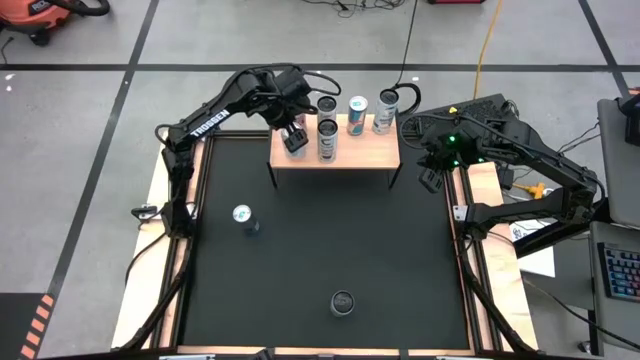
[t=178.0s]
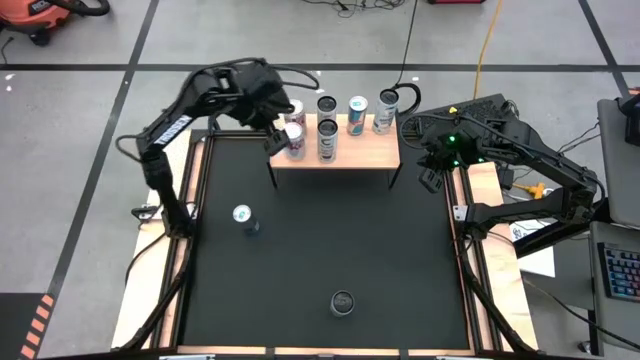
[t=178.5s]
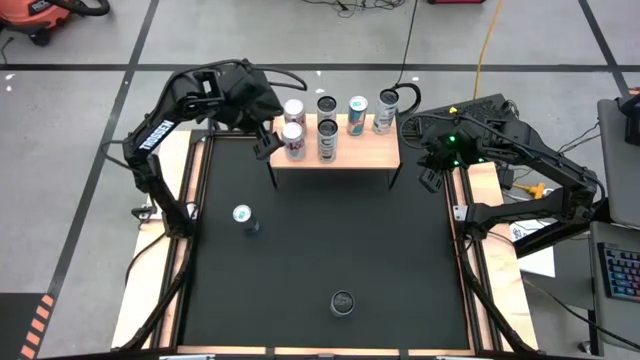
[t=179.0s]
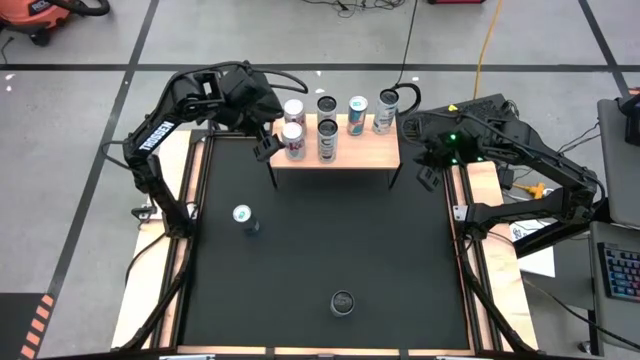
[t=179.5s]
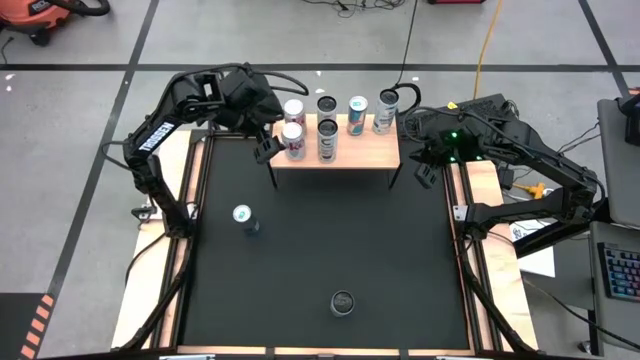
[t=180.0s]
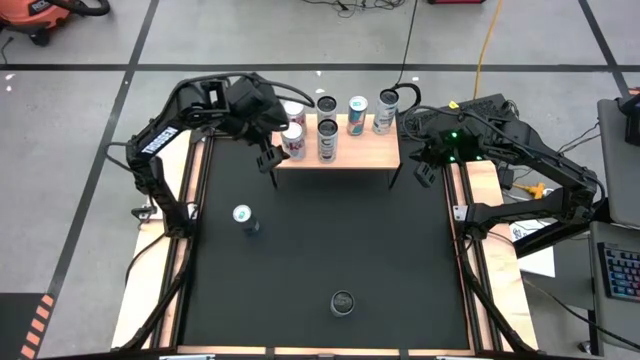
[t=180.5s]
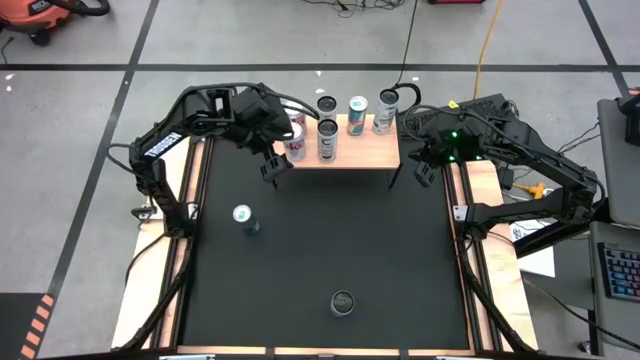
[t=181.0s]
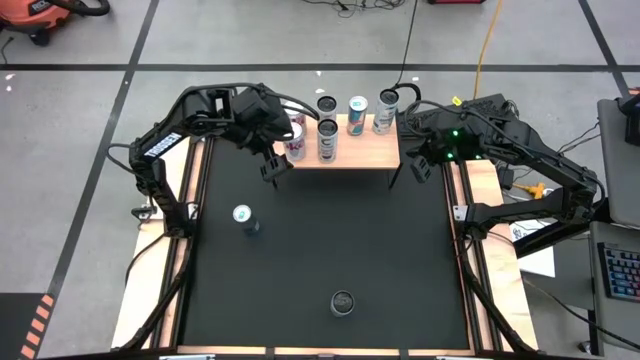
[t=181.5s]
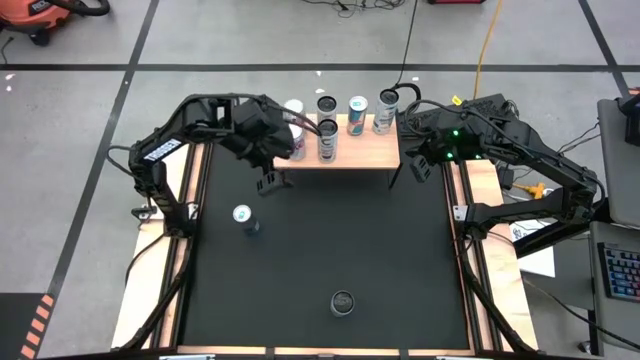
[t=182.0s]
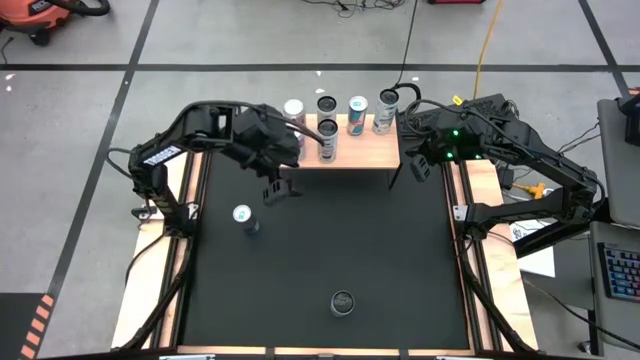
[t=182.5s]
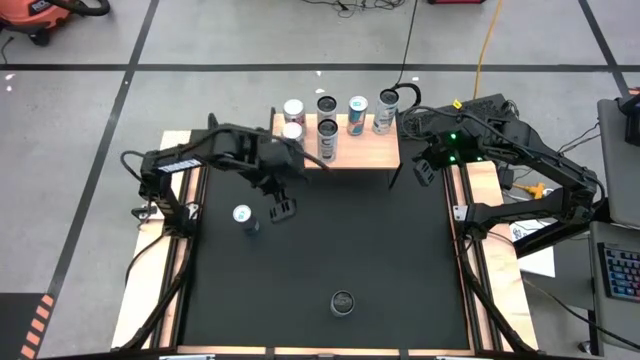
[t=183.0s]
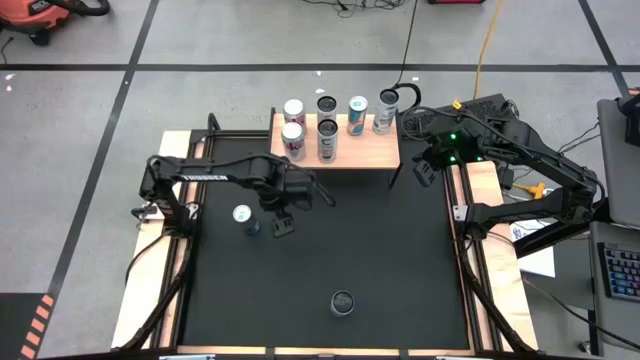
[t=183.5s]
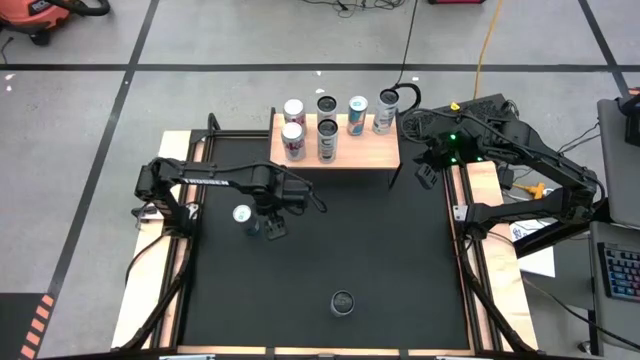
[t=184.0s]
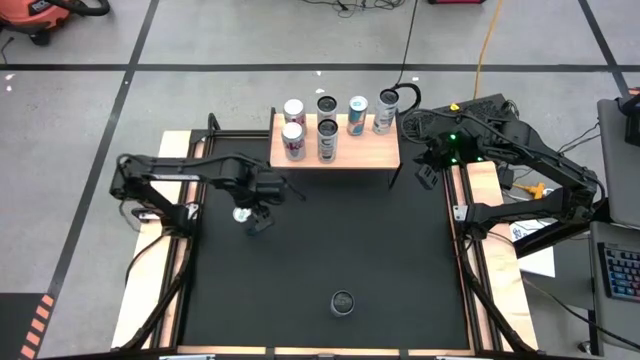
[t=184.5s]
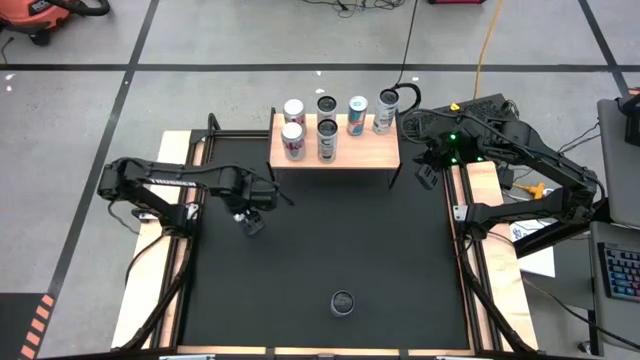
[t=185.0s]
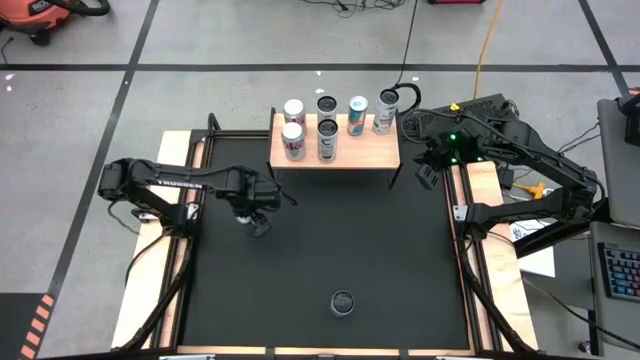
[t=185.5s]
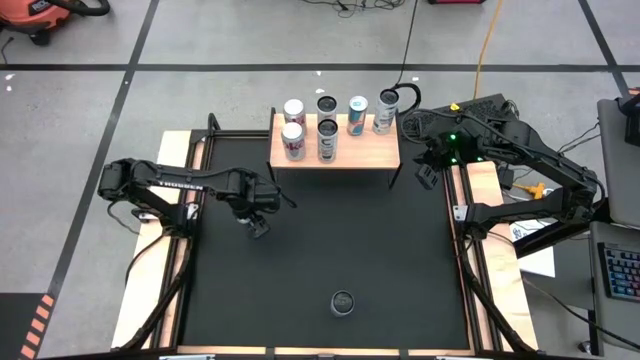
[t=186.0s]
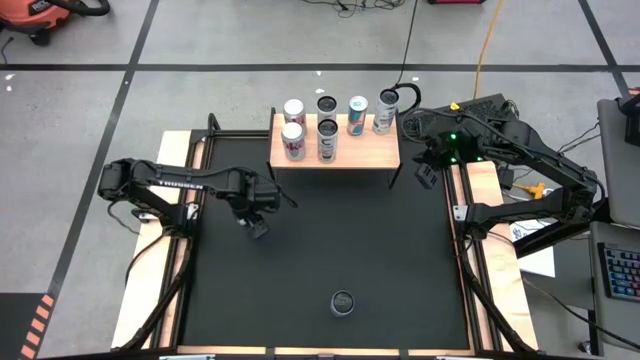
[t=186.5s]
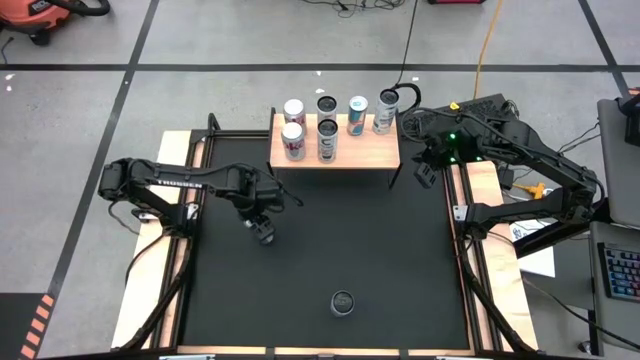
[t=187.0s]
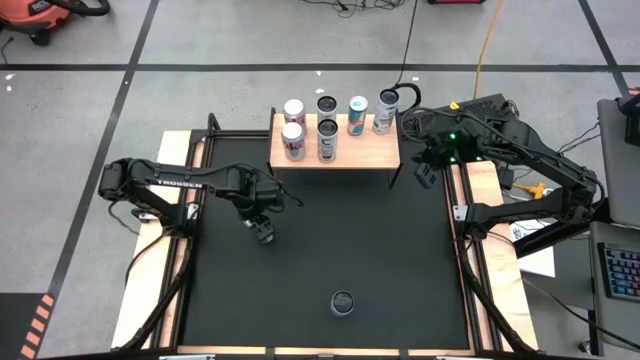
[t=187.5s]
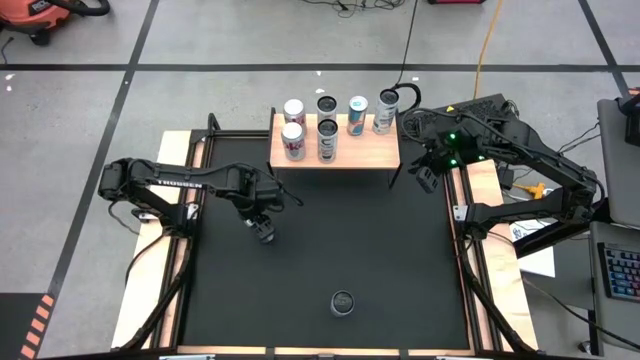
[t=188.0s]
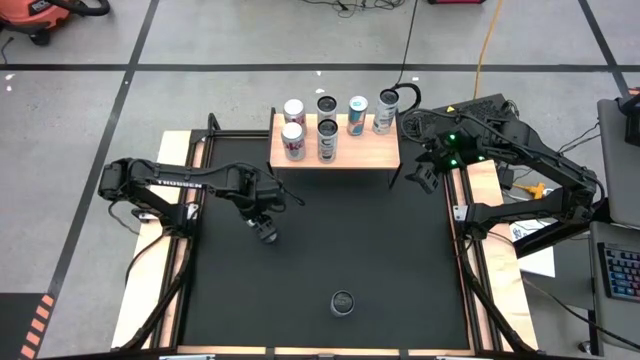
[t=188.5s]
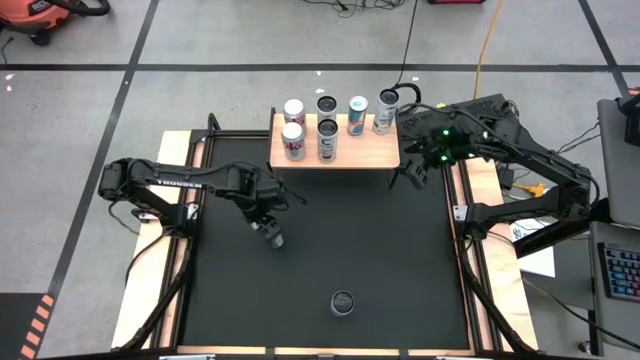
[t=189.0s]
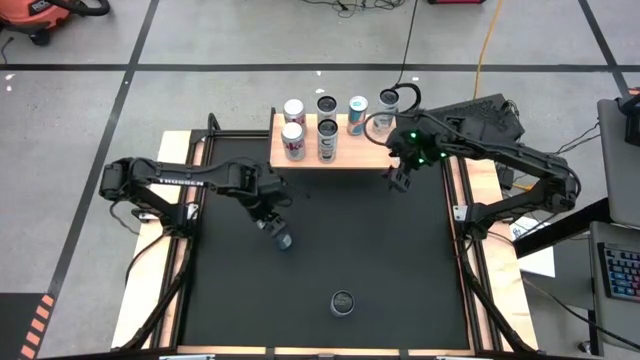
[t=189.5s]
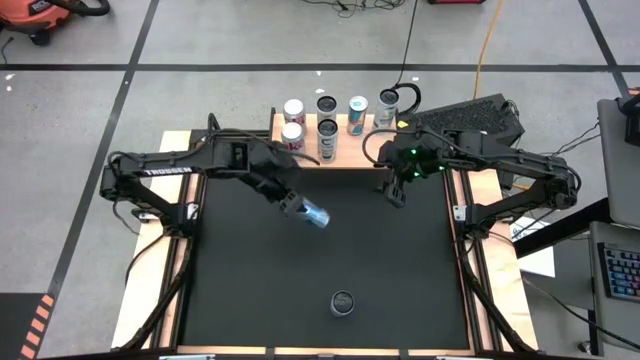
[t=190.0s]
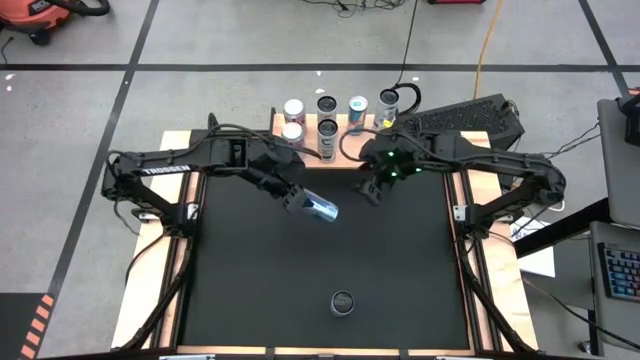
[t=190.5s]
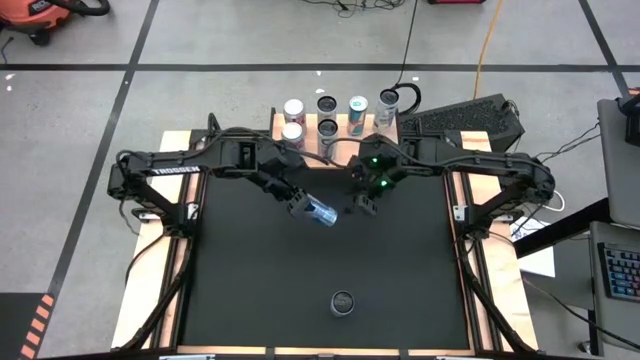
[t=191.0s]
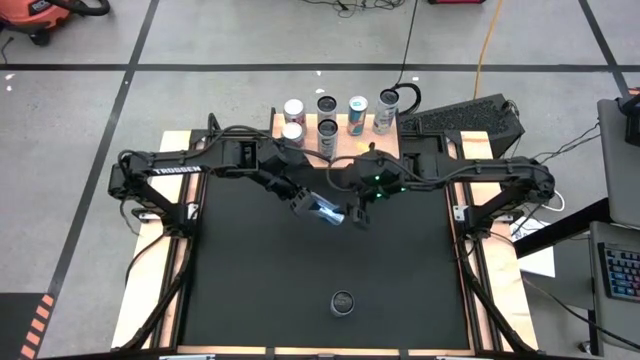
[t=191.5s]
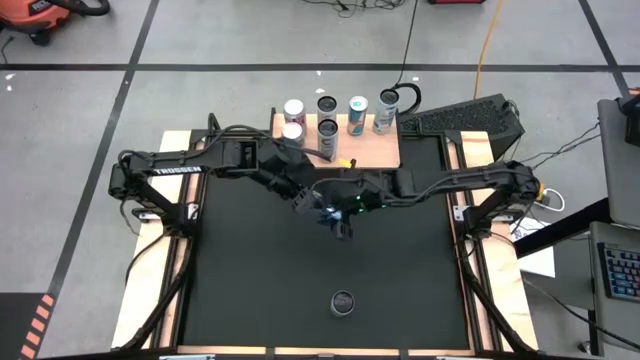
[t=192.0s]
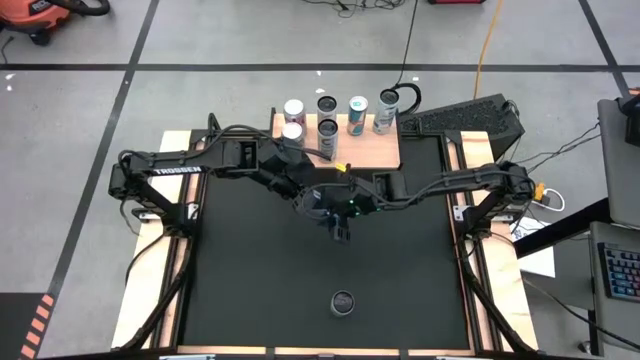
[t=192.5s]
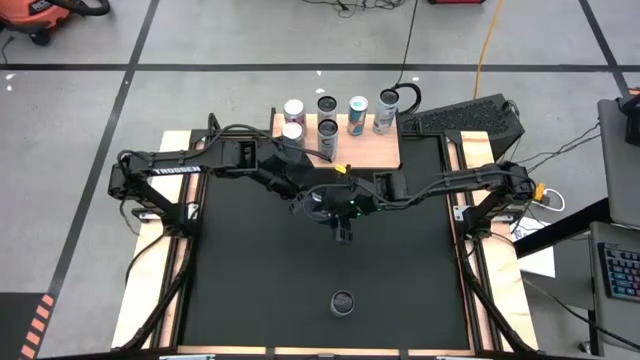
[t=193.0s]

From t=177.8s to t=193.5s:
Task: Place canned beverage on shelf
Put the blue soda can aligned with the other blue soda can on the shelf
